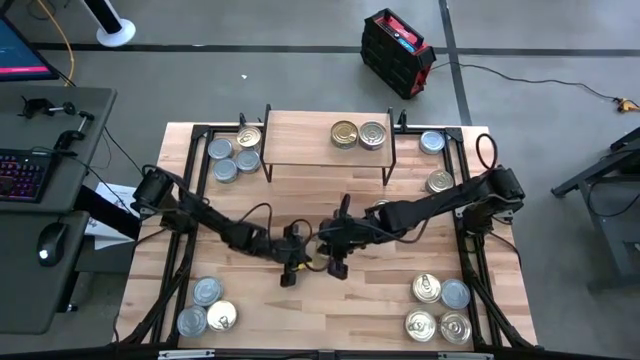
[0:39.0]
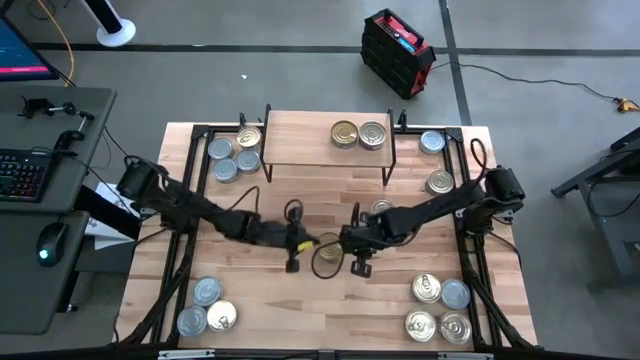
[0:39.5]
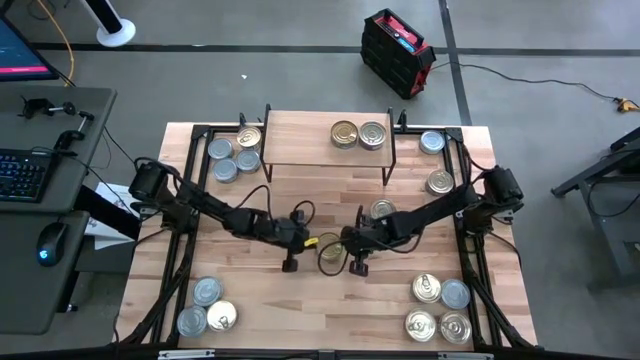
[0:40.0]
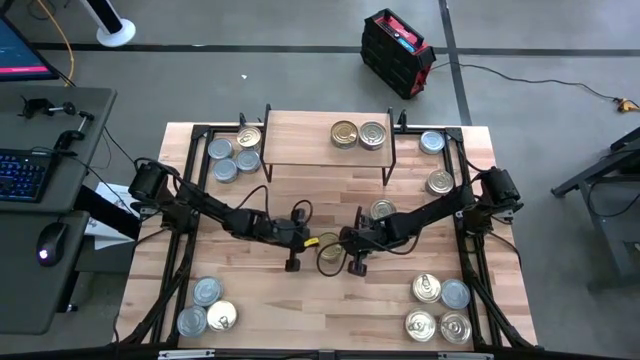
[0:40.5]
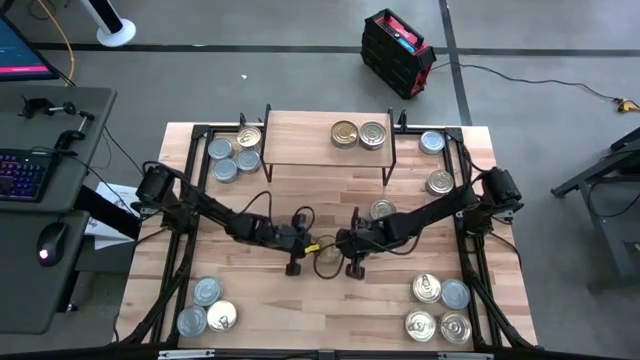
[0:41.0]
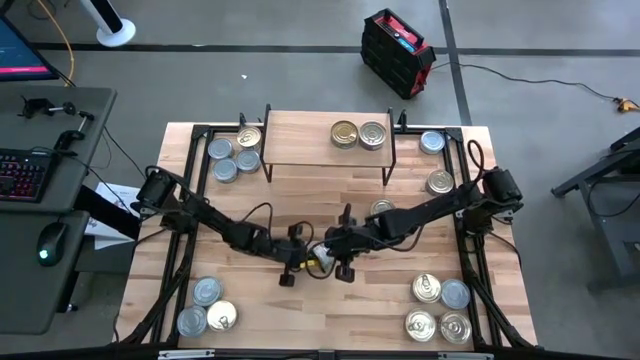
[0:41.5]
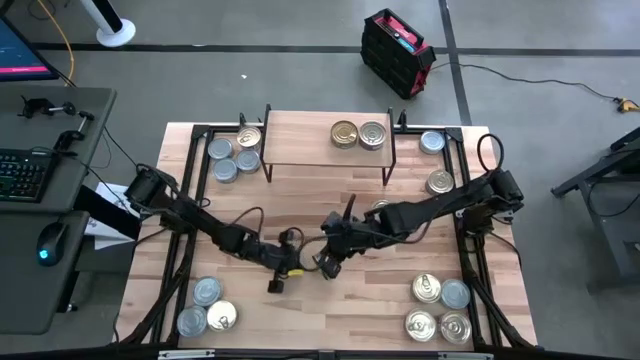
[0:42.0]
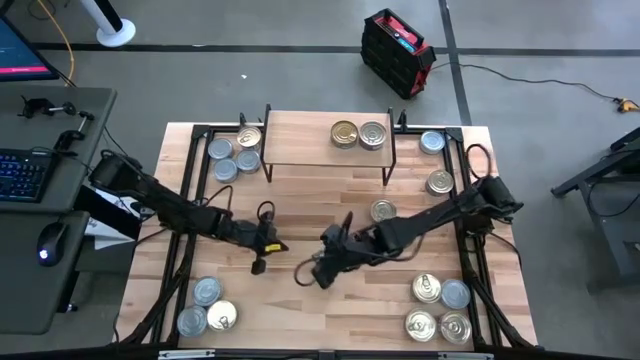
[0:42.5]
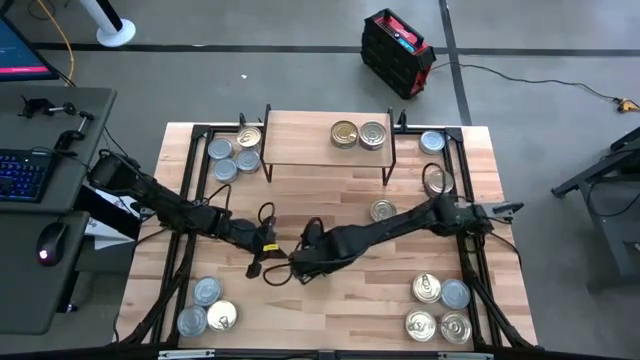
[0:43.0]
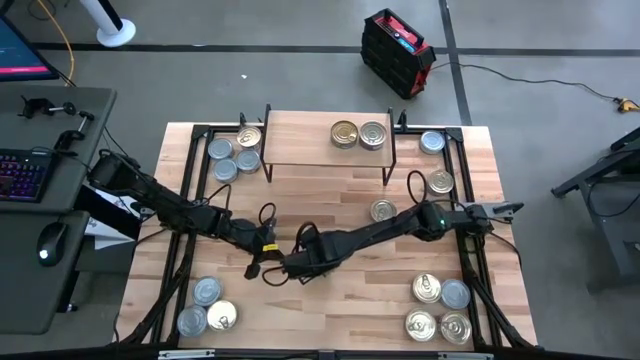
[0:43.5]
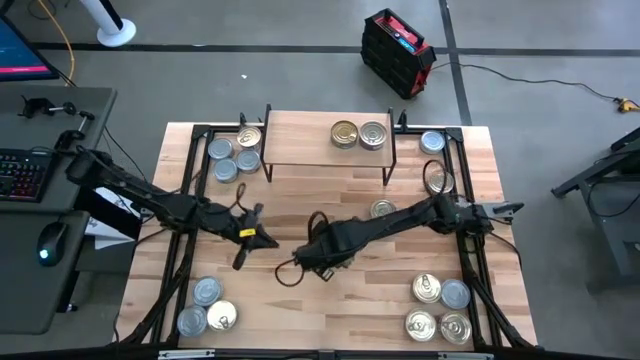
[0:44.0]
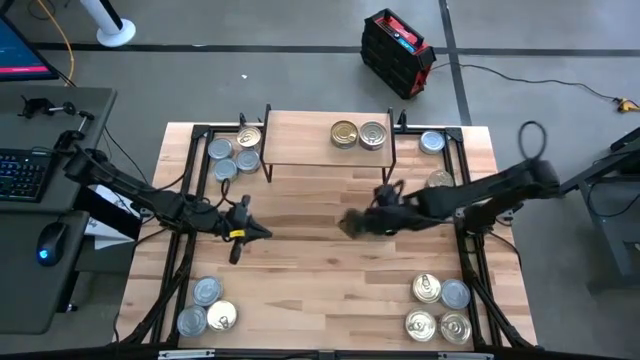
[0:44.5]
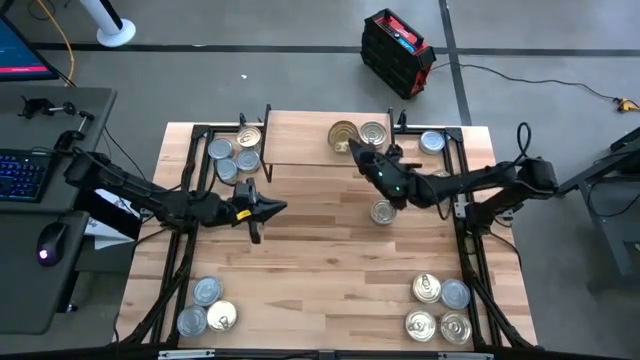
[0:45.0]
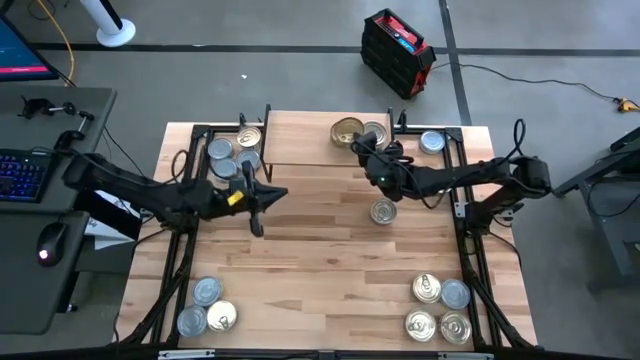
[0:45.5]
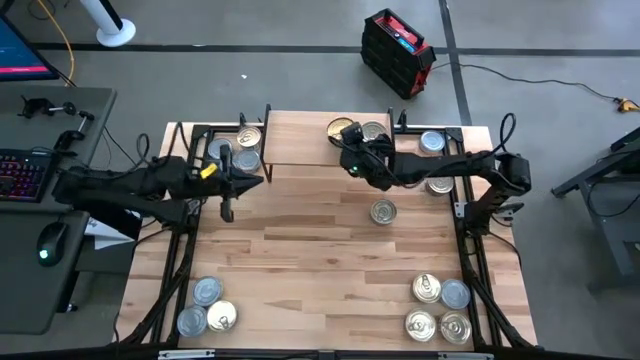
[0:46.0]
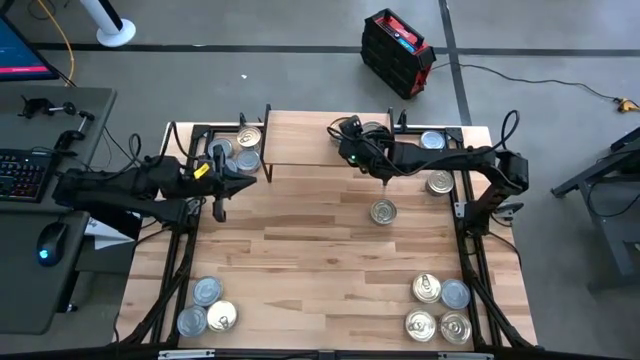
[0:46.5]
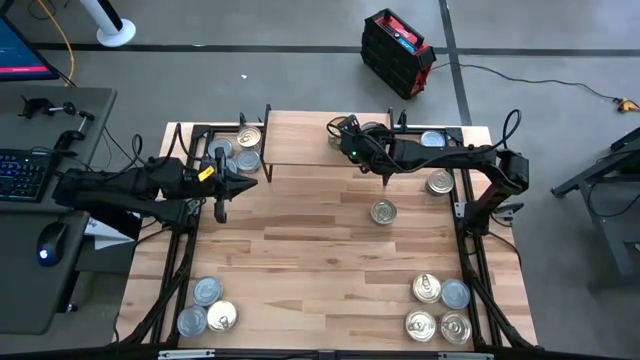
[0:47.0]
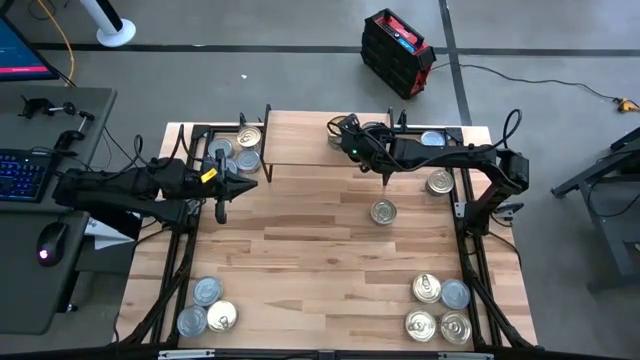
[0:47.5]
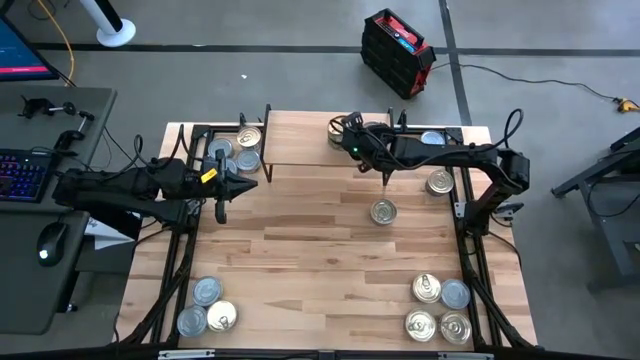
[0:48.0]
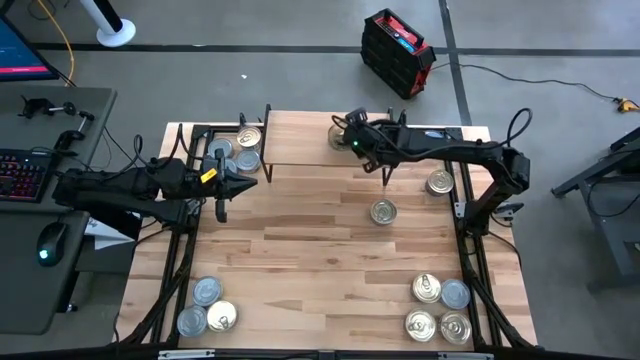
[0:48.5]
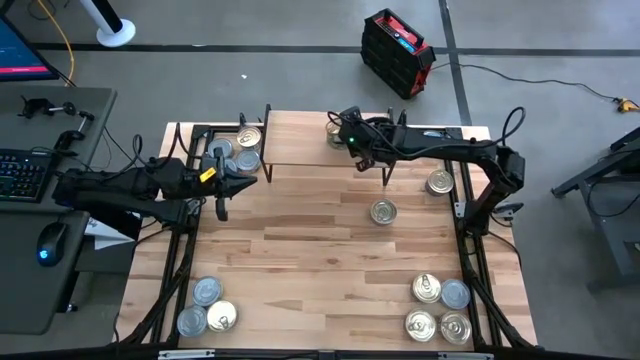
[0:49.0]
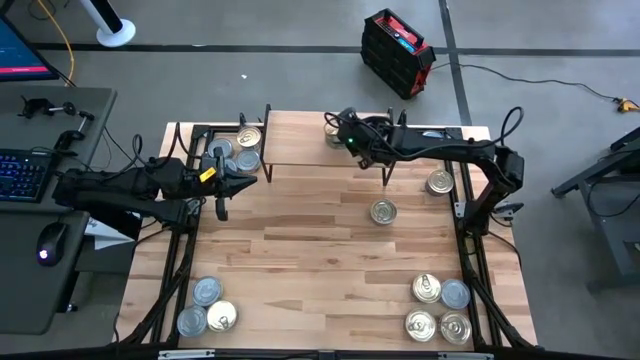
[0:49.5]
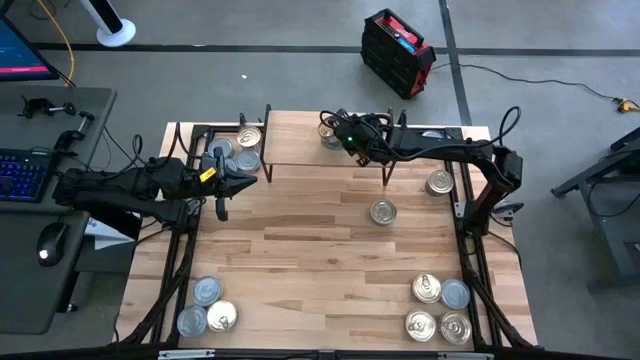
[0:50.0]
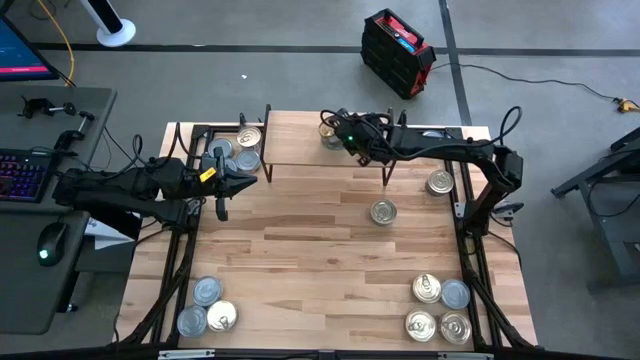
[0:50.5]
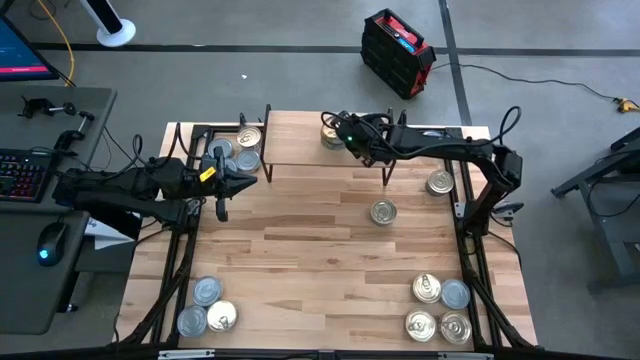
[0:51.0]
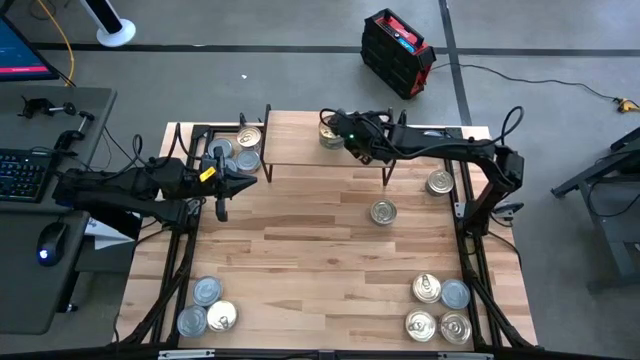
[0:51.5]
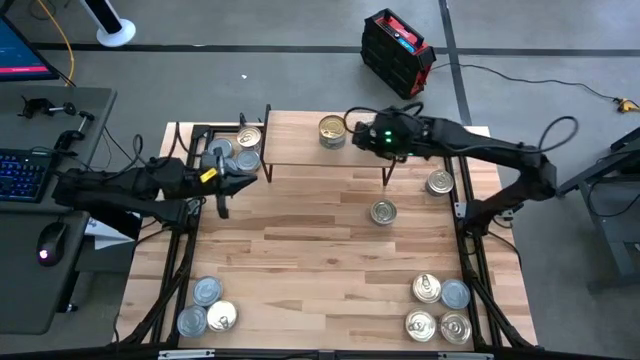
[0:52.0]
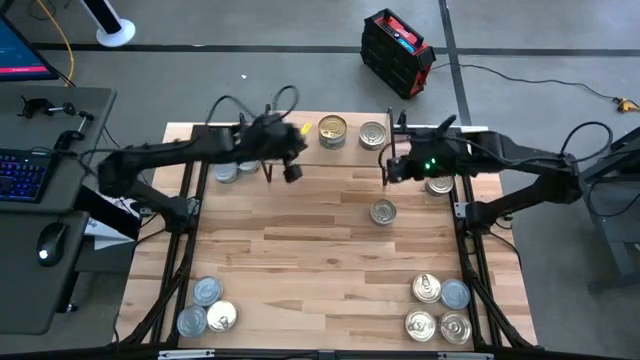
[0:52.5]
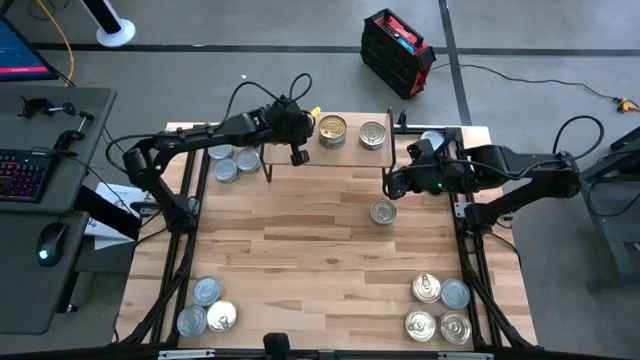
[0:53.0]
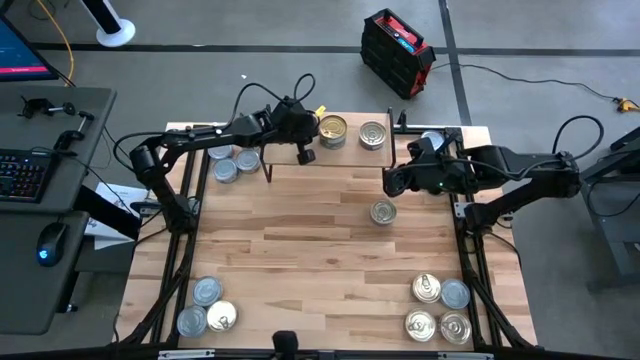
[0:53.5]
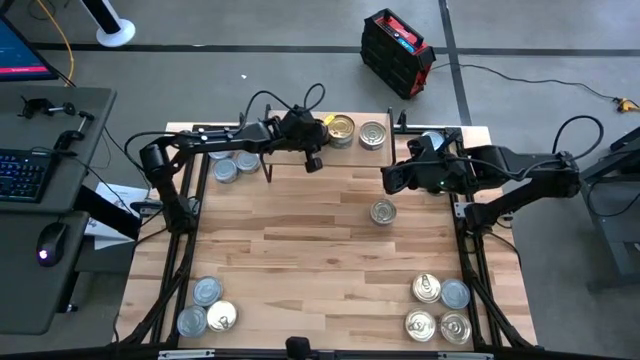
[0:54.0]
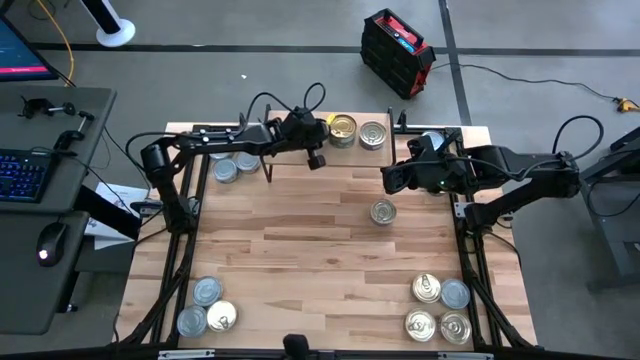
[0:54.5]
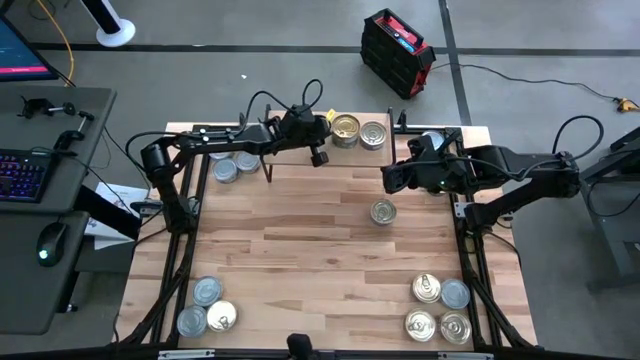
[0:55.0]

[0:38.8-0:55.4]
Task: Stack canned seafood by type on shelf
Stack the green tuna can on top of the other green tuna can on the shelf

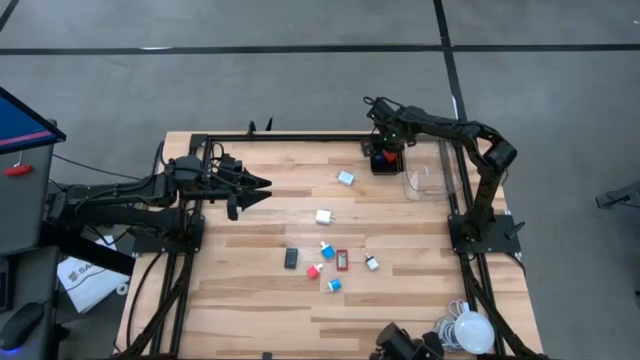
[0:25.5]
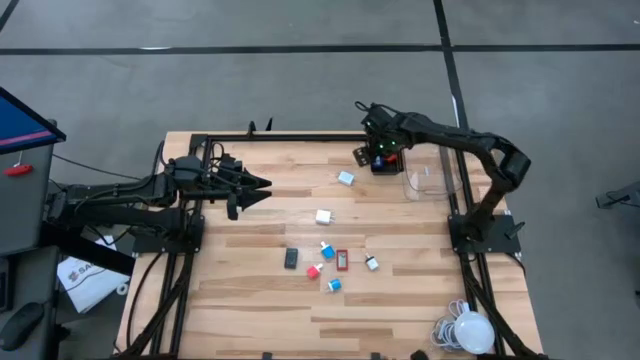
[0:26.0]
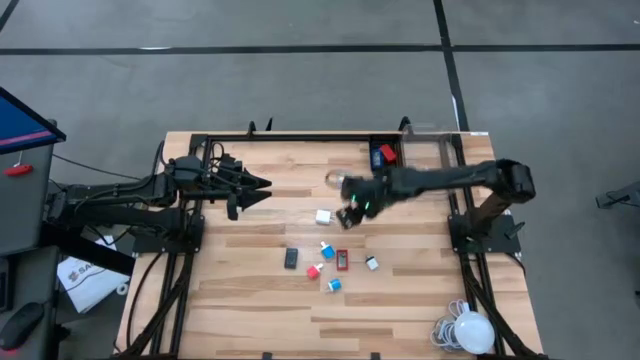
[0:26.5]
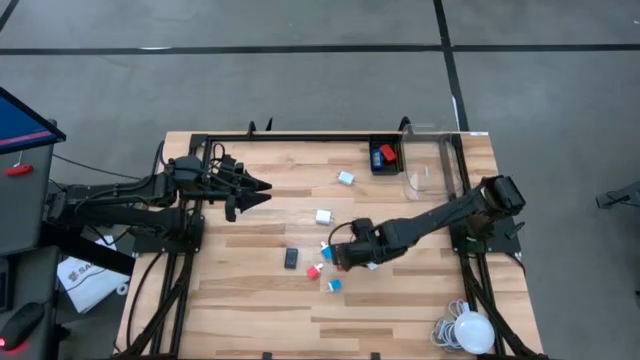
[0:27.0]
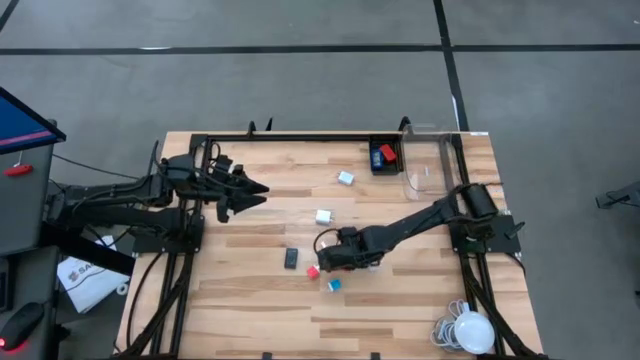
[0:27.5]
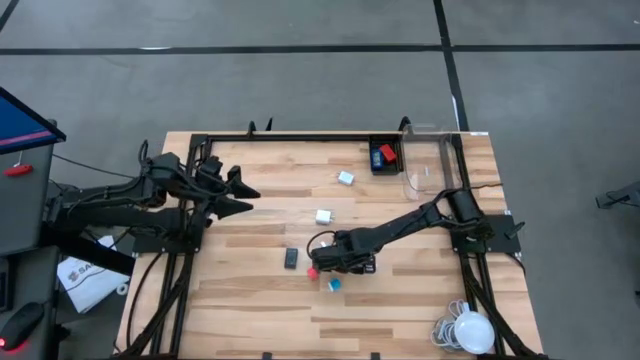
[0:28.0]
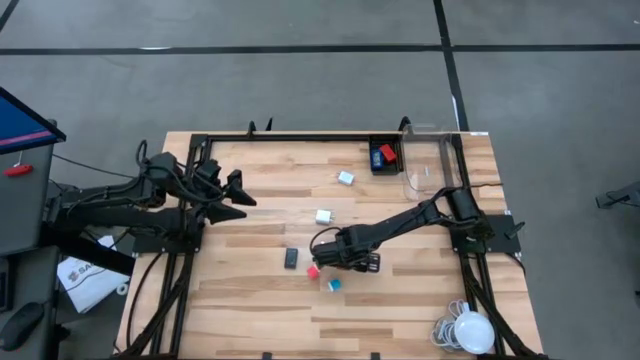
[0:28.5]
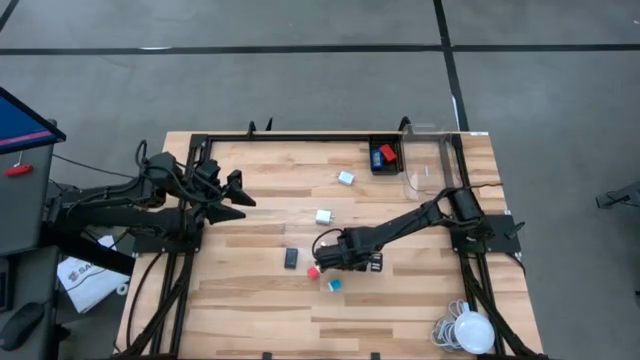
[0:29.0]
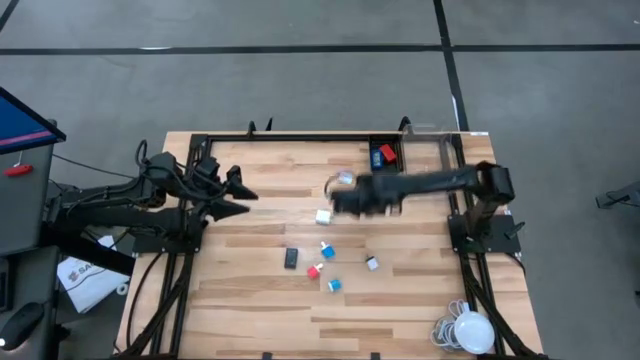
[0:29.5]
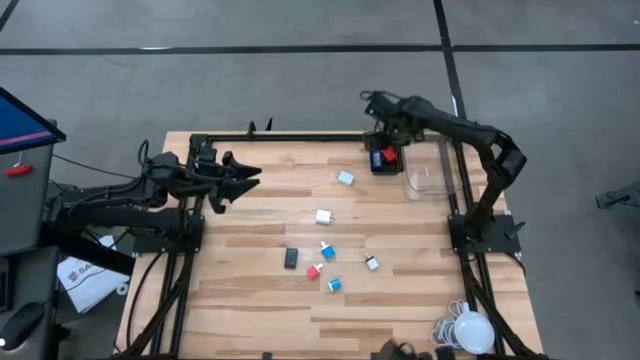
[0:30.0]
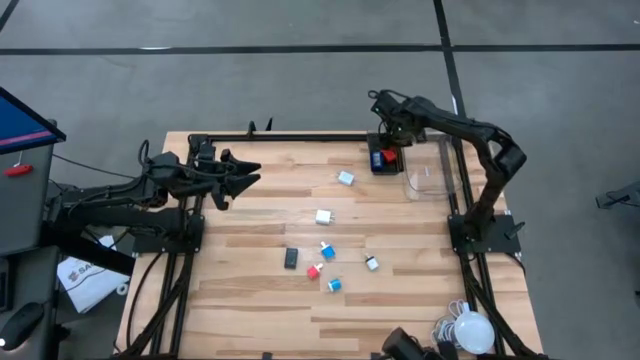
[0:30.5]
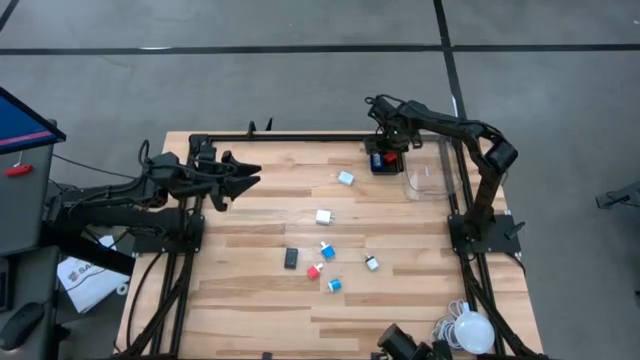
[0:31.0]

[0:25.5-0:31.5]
Task: Pick & Place Office items
Put the red digital timer into the black bin
